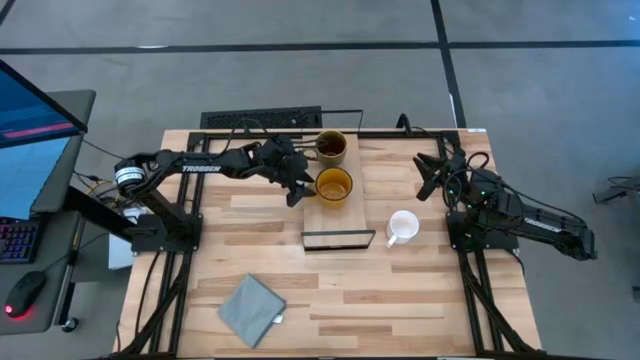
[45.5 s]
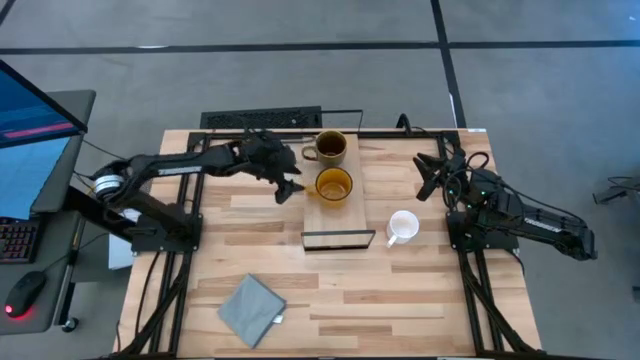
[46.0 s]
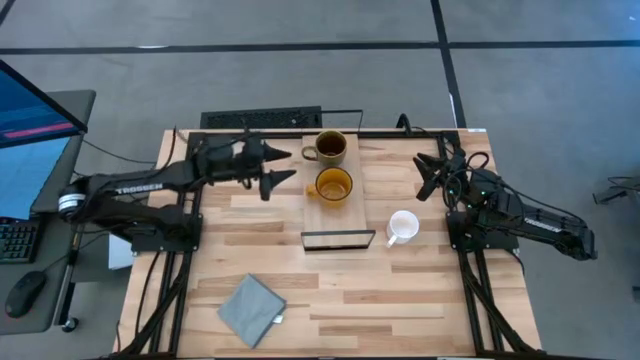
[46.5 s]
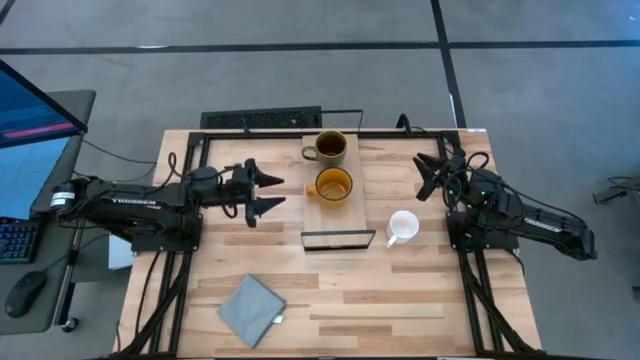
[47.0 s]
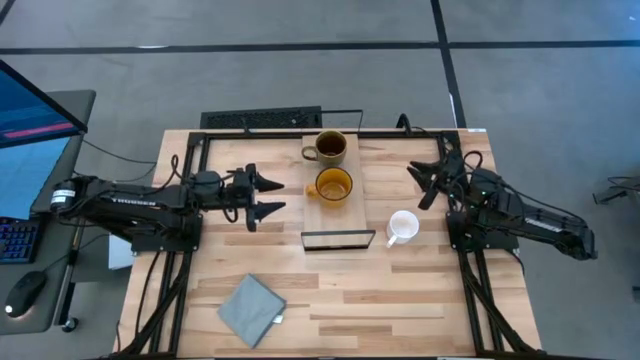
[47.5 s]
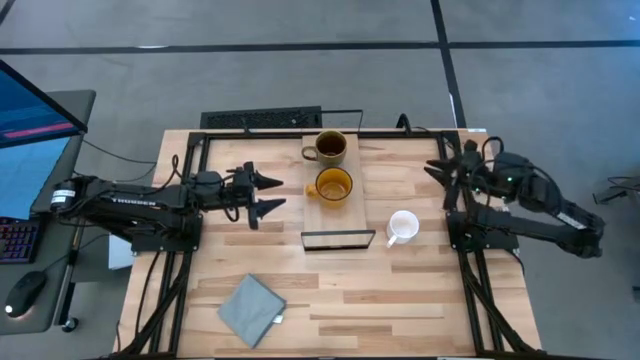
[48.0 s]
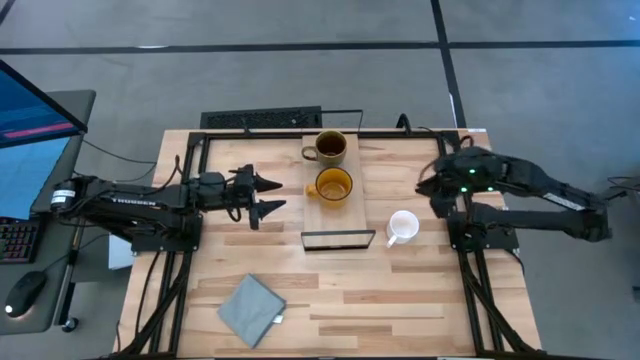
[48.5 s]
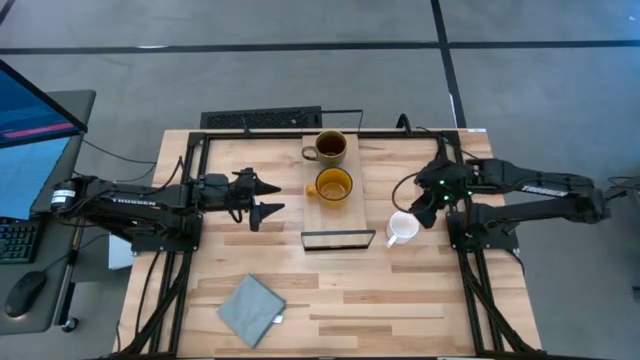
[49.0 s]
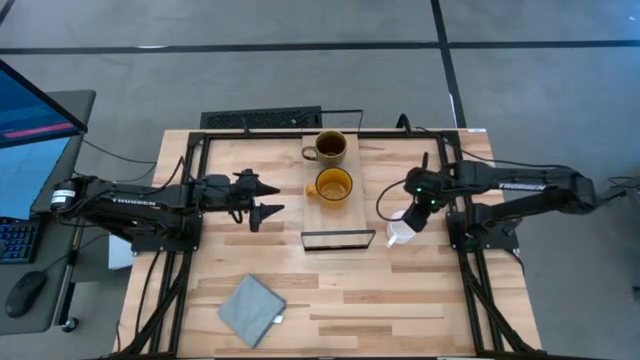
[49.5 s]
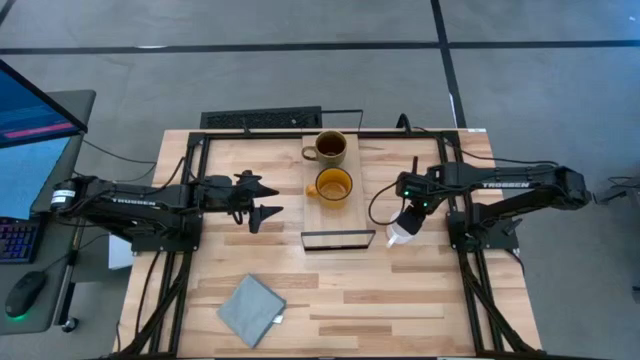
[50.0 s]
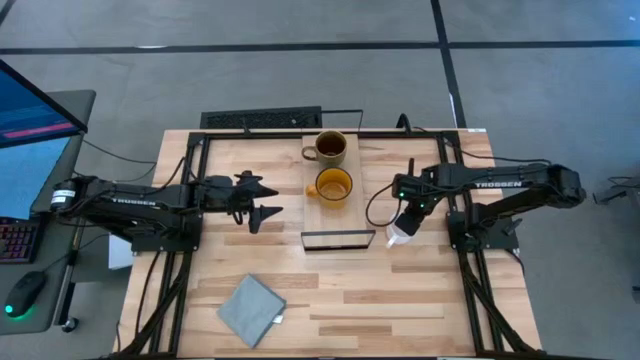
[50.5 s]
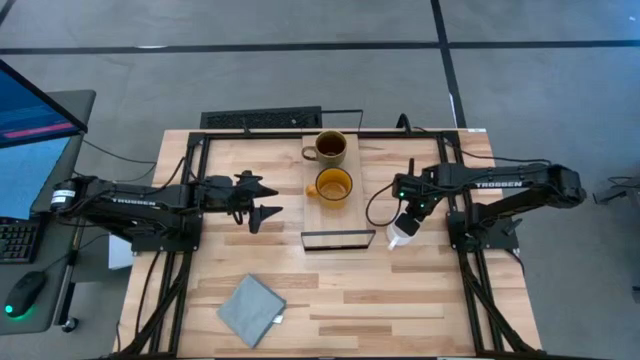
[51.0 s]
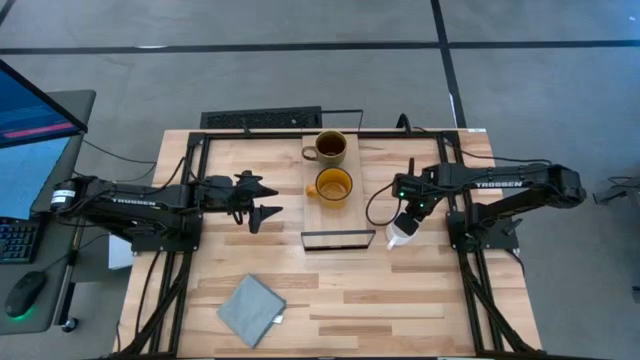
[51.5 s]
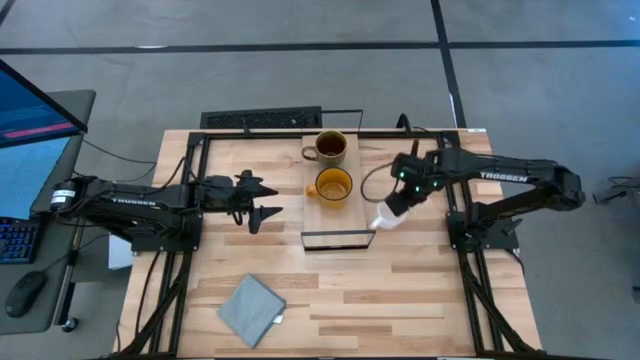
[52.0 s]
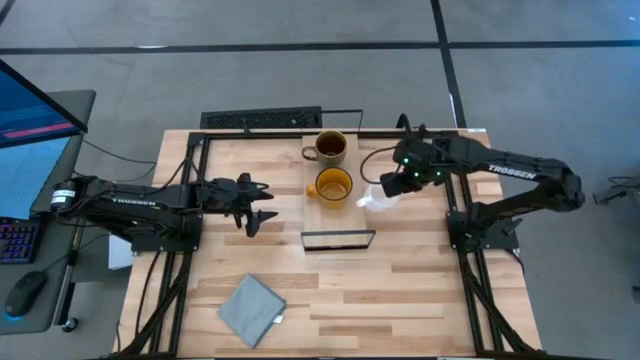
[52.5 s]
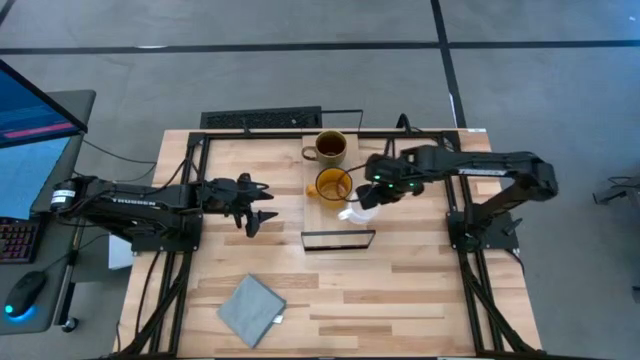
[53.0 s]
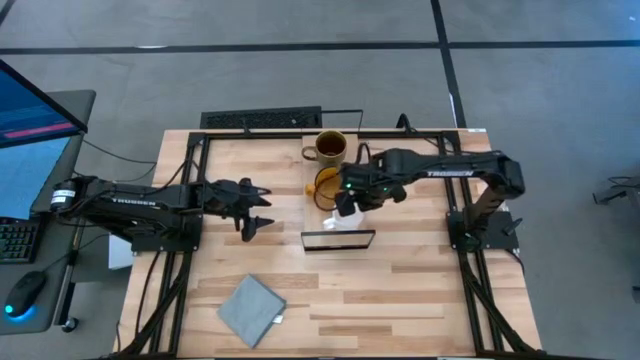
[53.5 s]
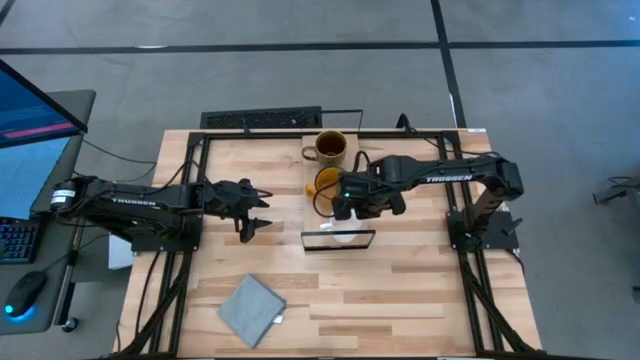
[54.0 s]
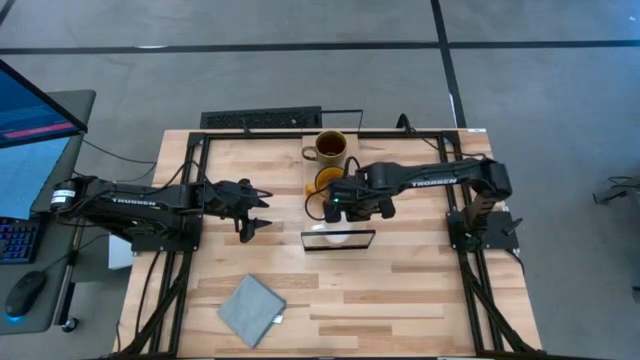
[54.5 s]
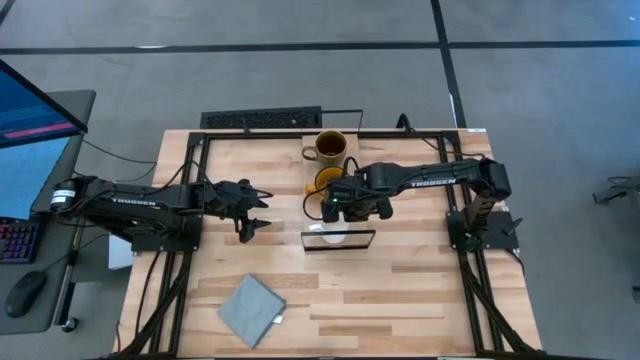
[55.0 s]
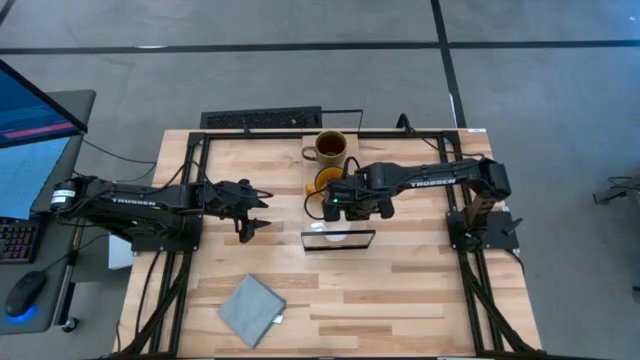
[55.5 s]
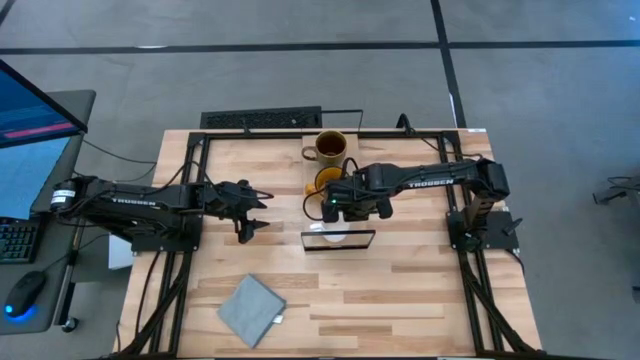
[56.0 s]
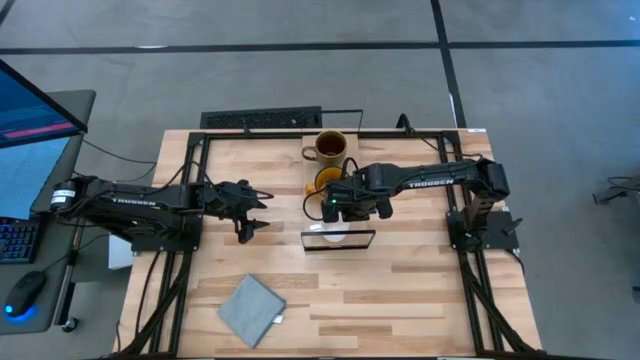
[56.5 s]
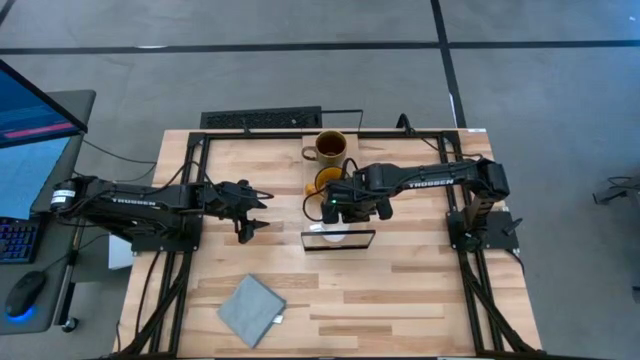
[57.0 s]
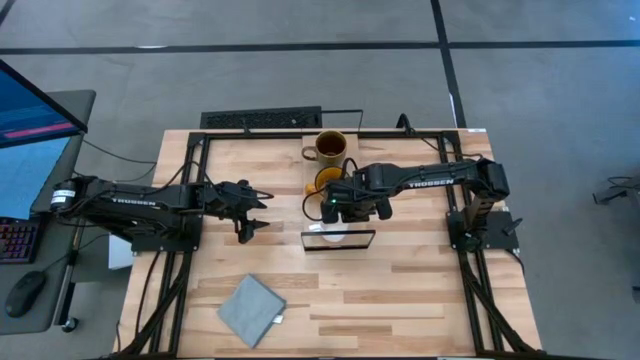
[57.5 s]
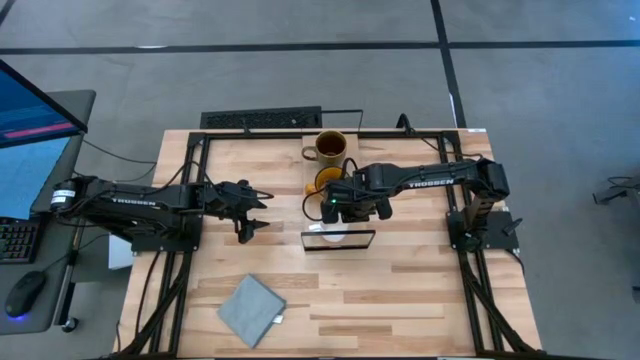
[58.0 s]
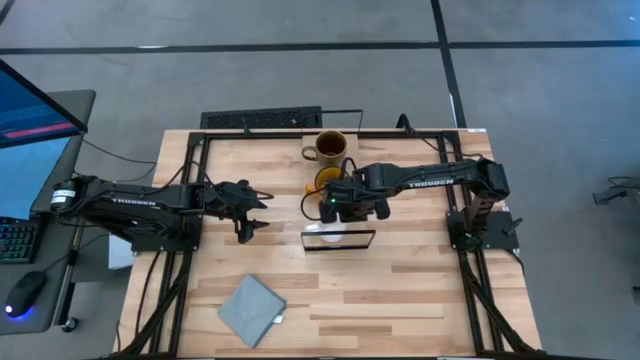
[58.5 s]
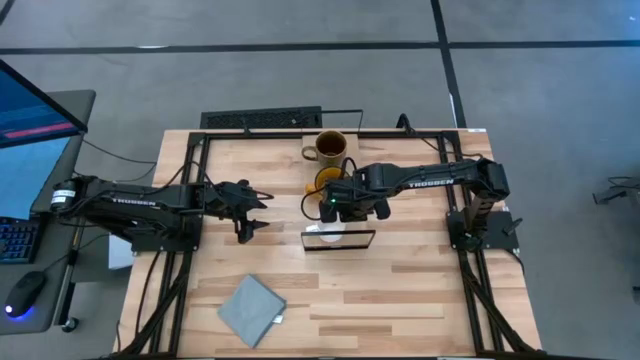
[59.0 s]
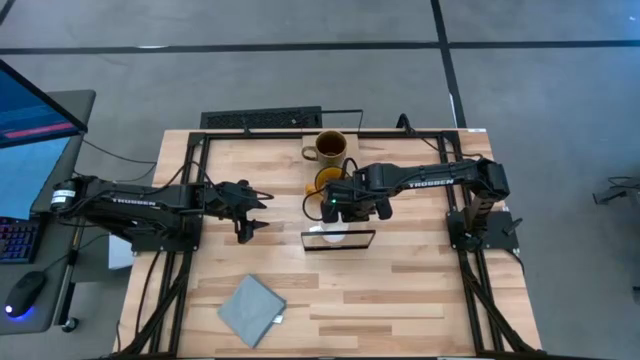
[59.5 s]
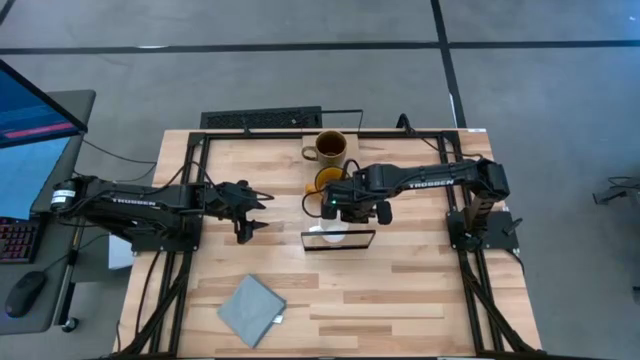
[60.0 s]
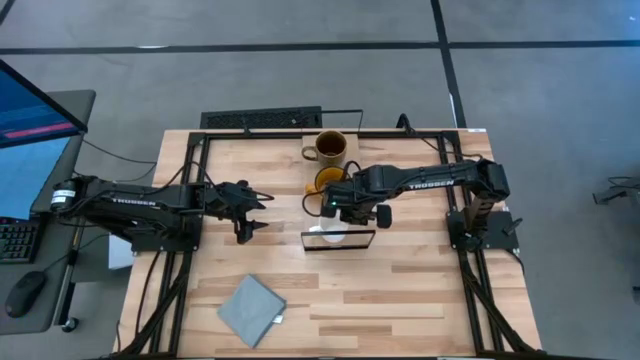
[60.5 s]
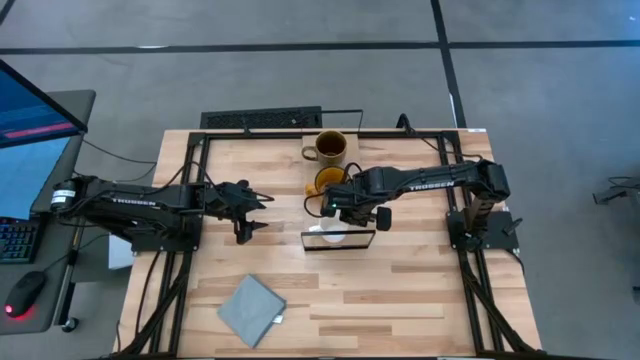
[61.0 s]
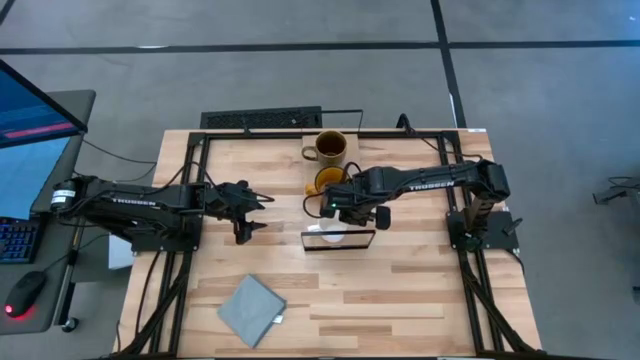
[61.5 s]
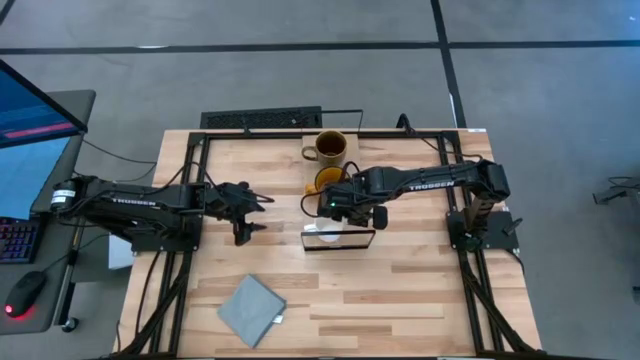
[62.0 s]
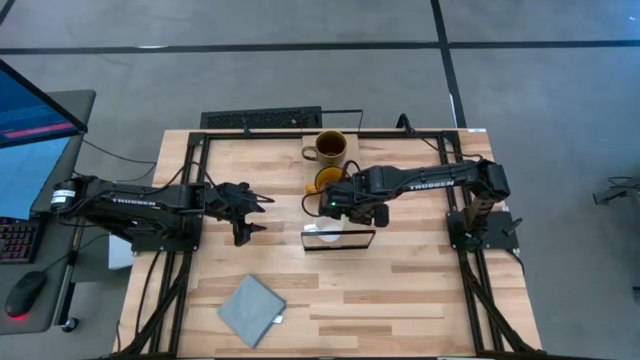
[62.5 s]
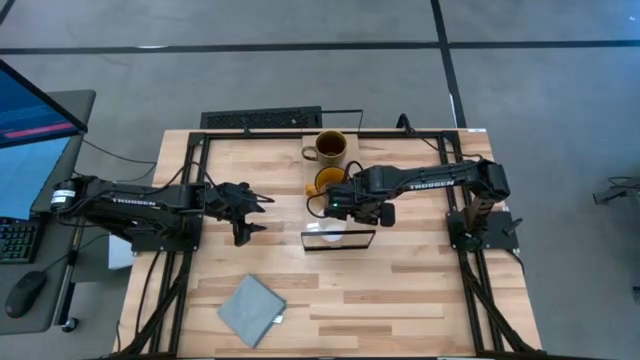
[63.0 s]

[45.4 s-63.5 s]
Task: Stack small to large cups/mugs on shelf
Put the white mug on the shelf

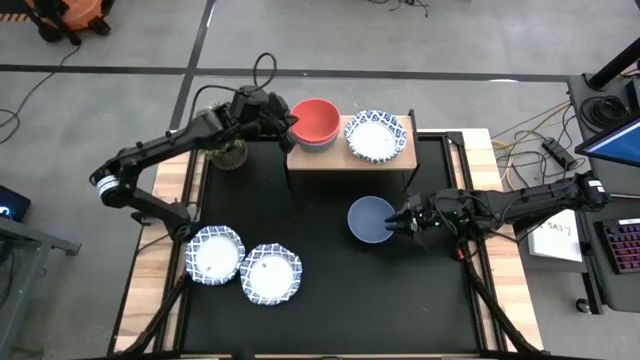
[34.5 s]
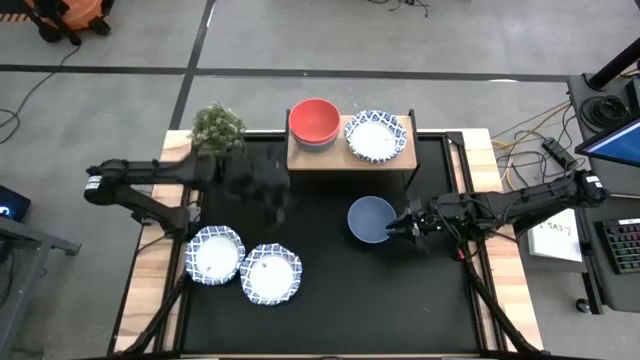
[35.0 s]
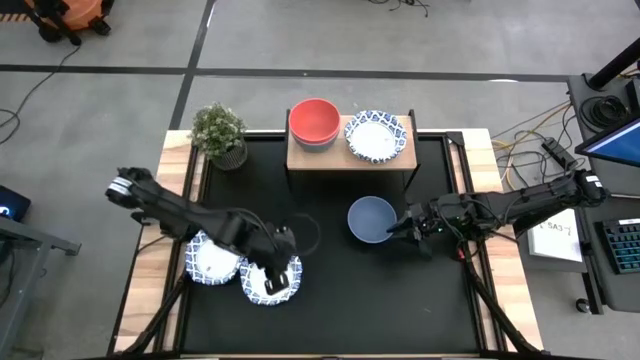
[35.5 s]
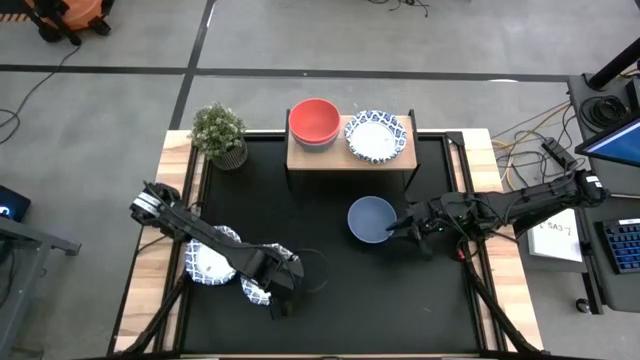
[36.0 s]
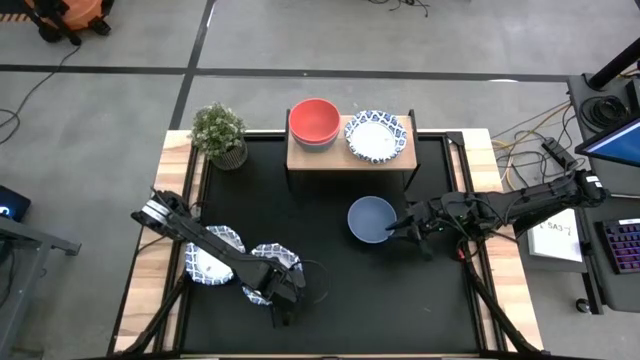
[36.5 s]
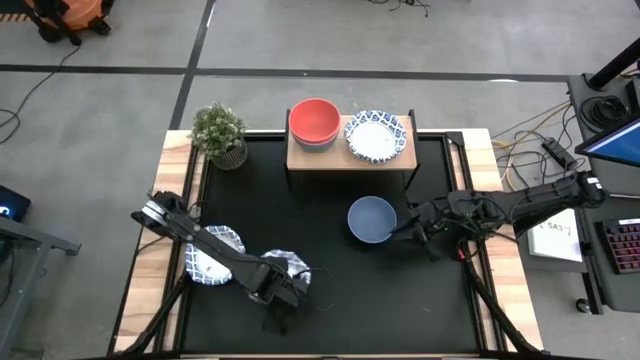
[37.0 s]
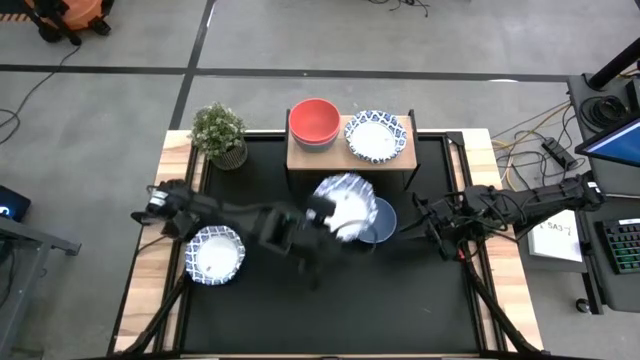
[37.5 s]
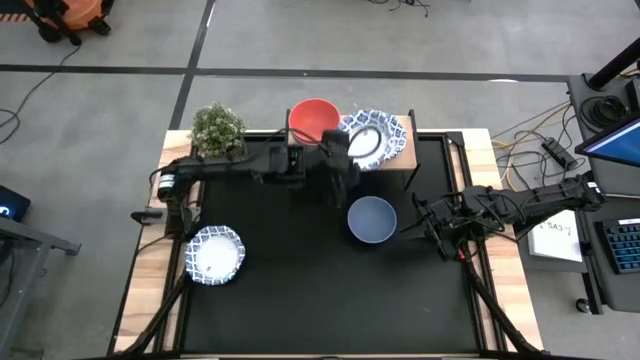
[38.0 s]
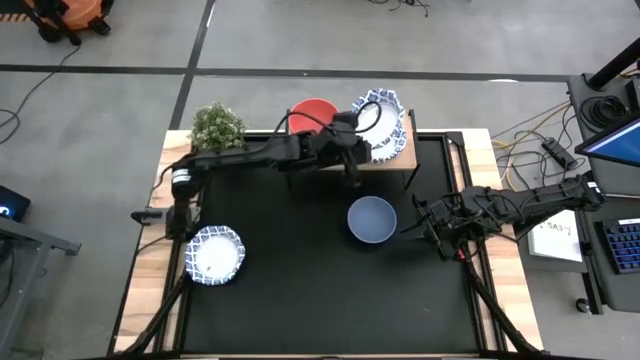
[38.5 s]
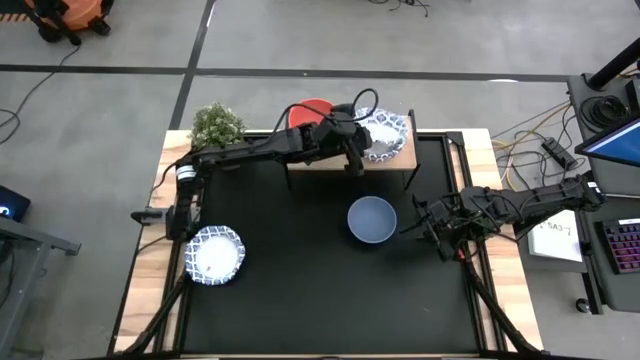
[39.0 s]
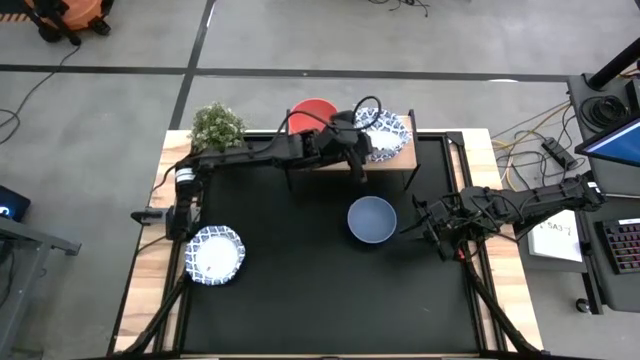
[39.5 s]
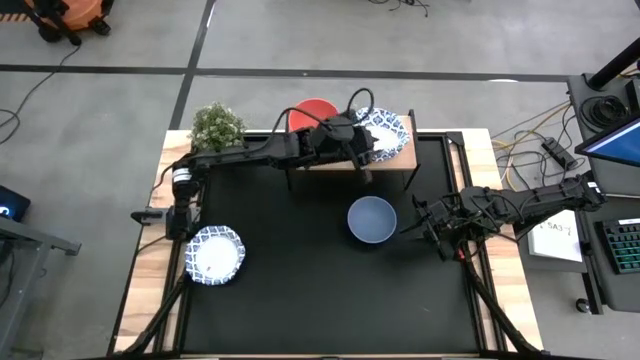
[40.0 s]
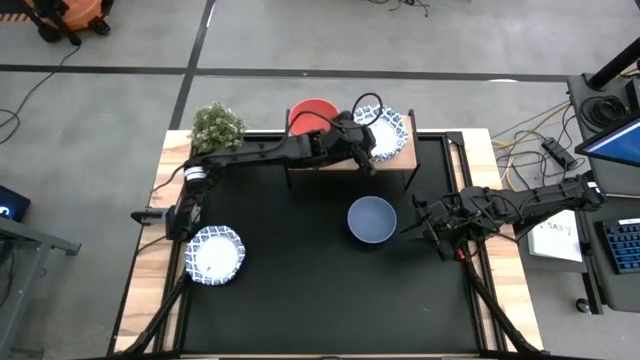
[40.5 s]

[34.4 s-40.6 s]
Task: Place and stack bowls onto a shelf
Stack the right white and blue paper plate on the white and blue paper plate on the shelf
